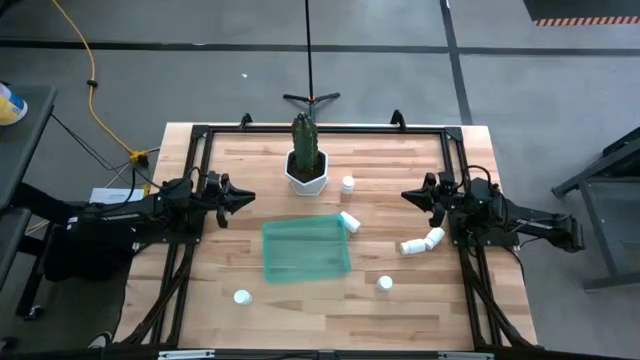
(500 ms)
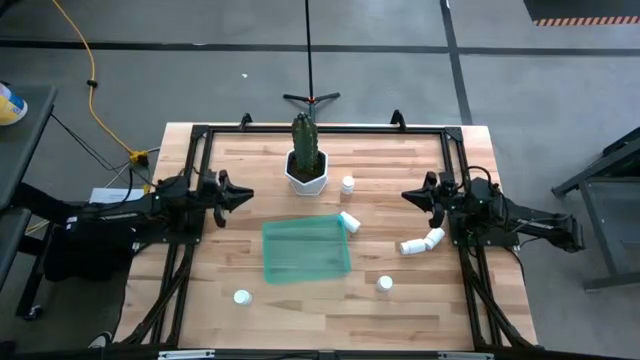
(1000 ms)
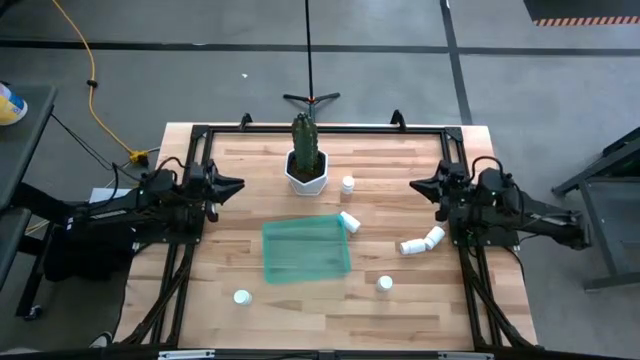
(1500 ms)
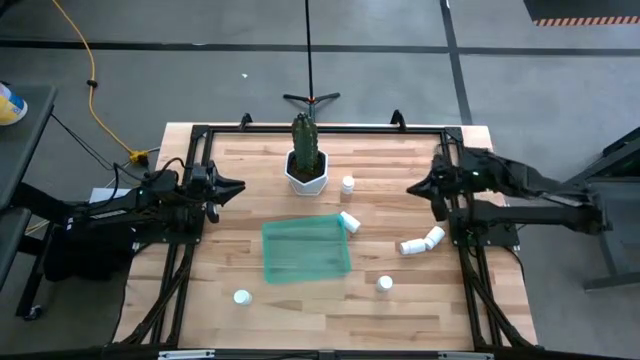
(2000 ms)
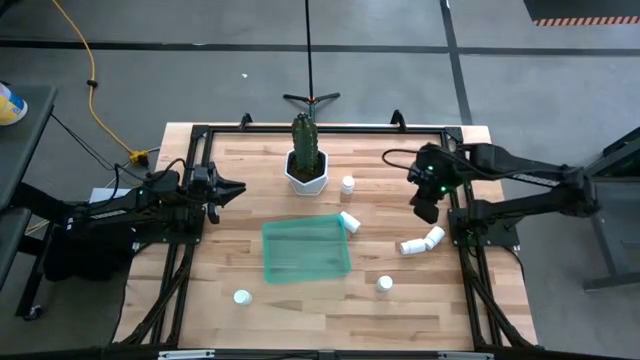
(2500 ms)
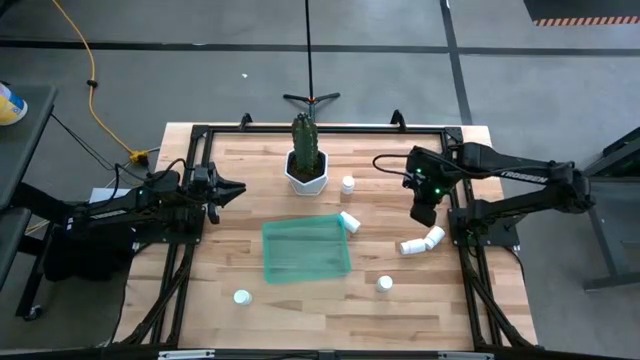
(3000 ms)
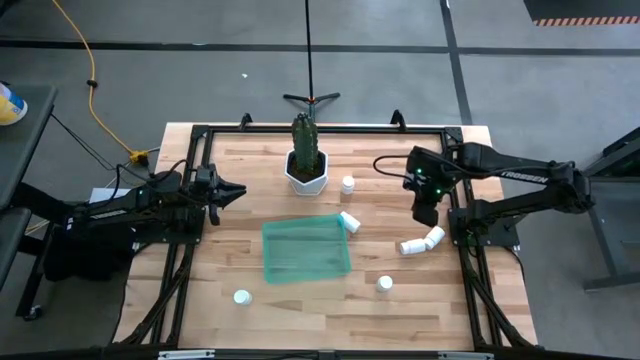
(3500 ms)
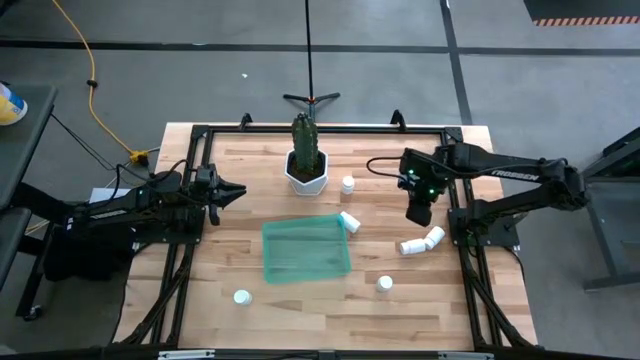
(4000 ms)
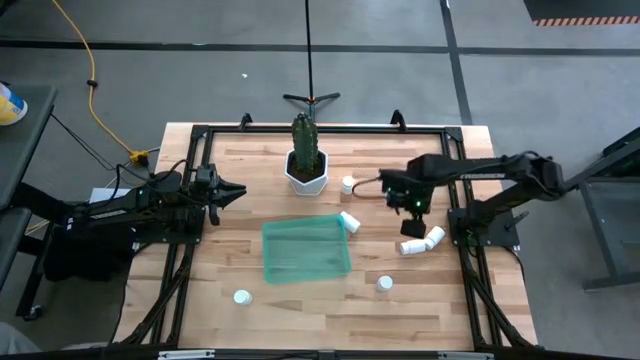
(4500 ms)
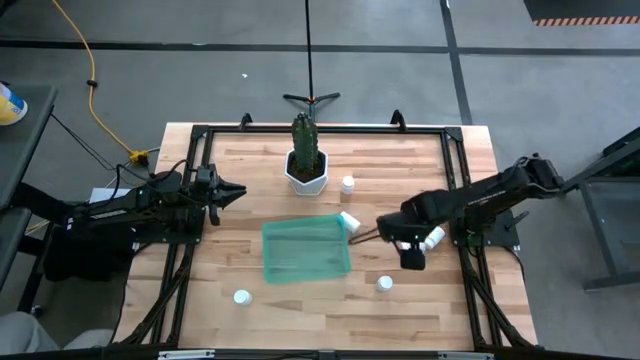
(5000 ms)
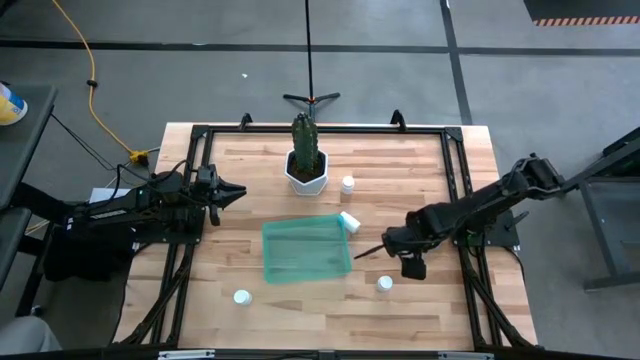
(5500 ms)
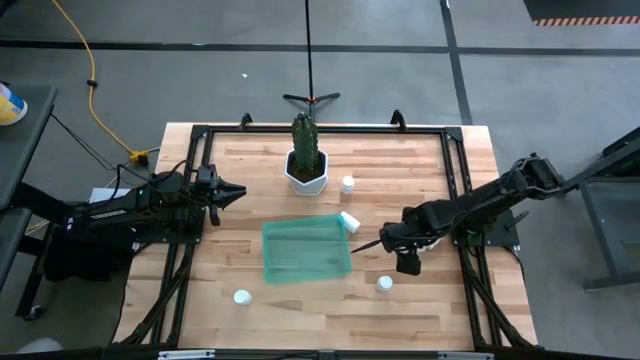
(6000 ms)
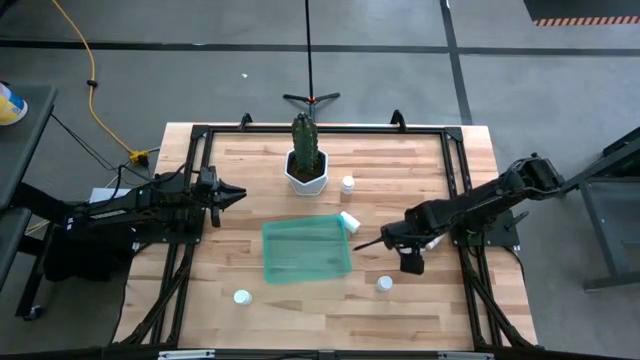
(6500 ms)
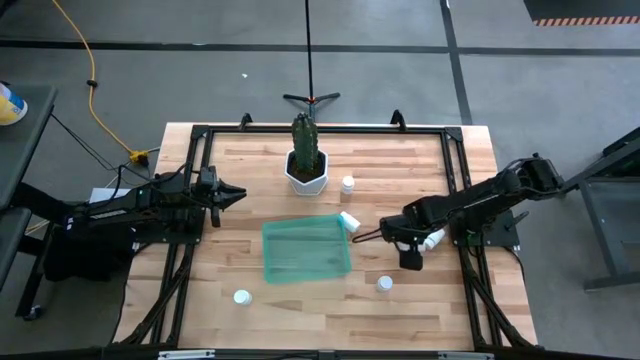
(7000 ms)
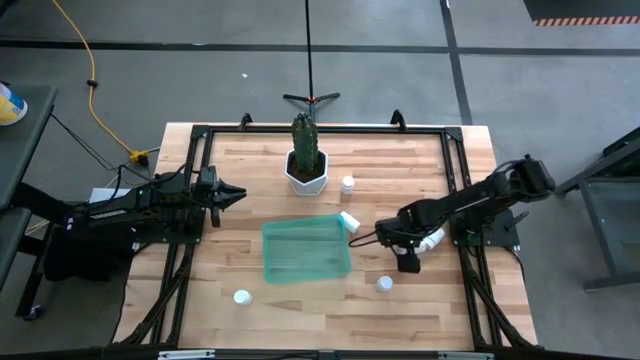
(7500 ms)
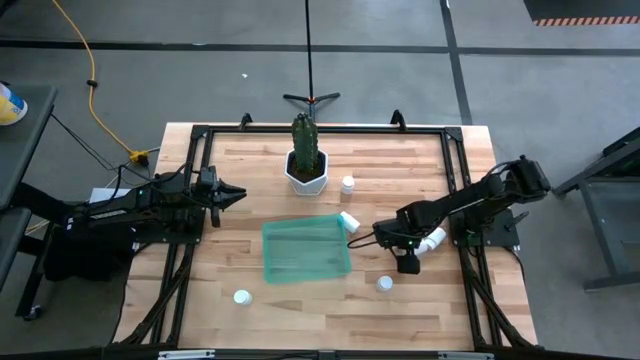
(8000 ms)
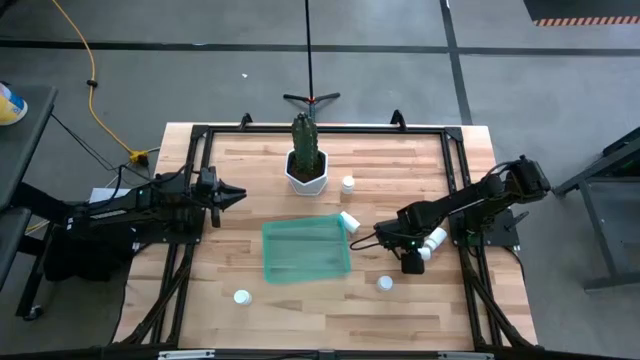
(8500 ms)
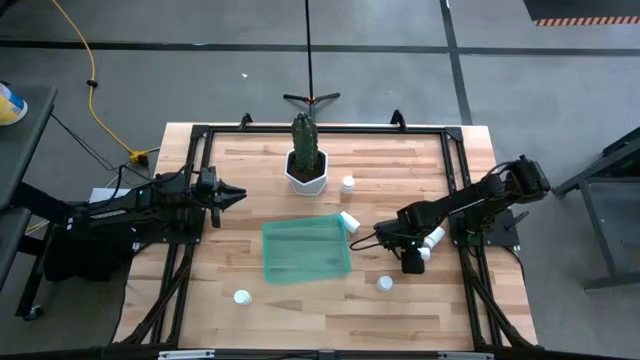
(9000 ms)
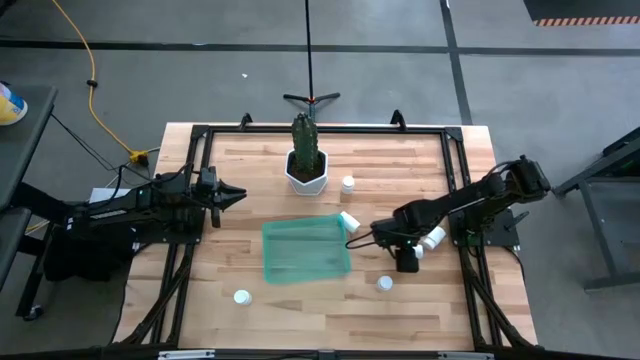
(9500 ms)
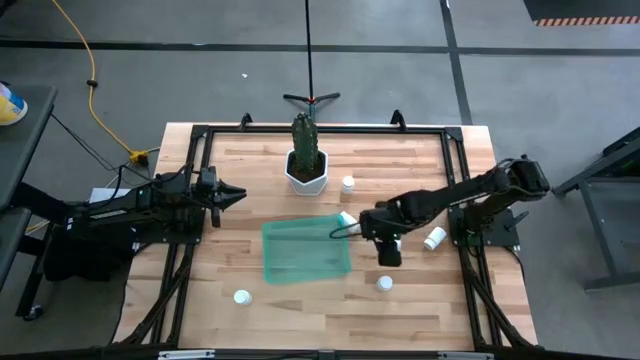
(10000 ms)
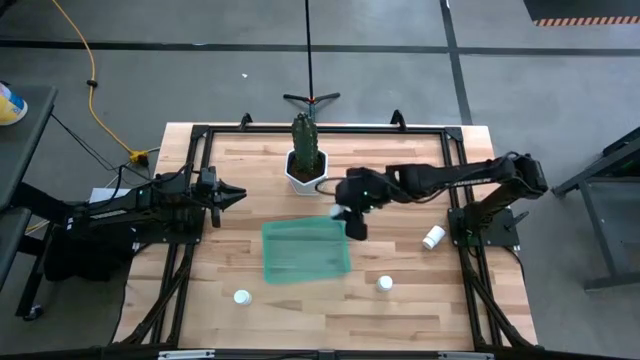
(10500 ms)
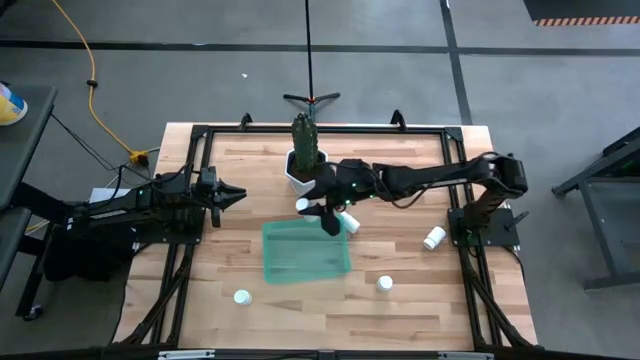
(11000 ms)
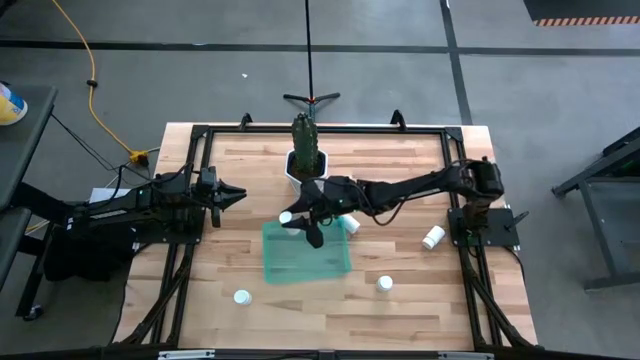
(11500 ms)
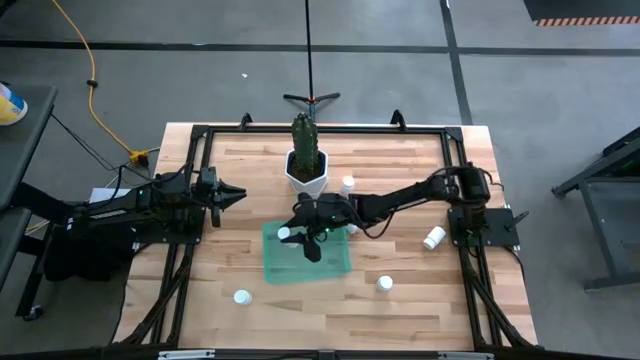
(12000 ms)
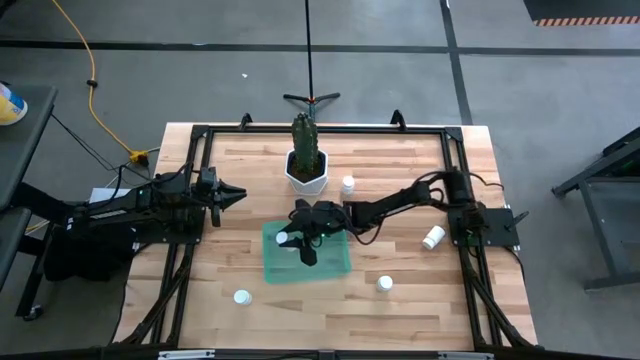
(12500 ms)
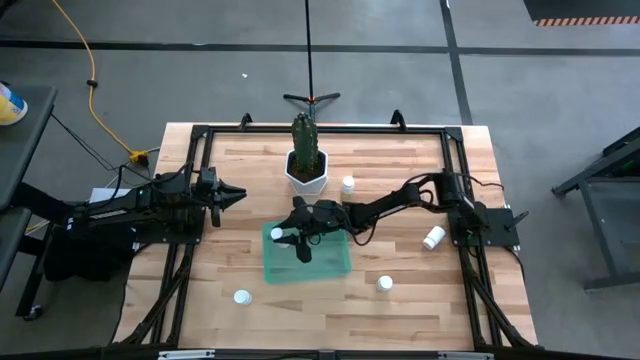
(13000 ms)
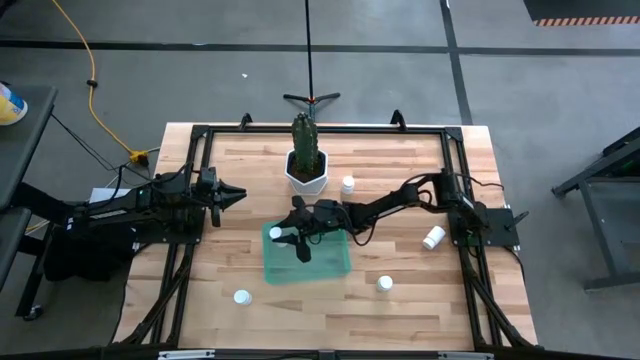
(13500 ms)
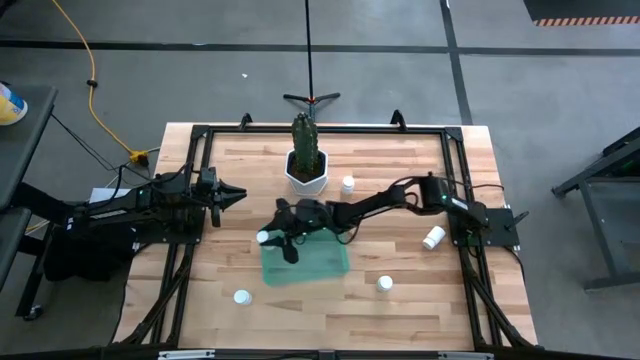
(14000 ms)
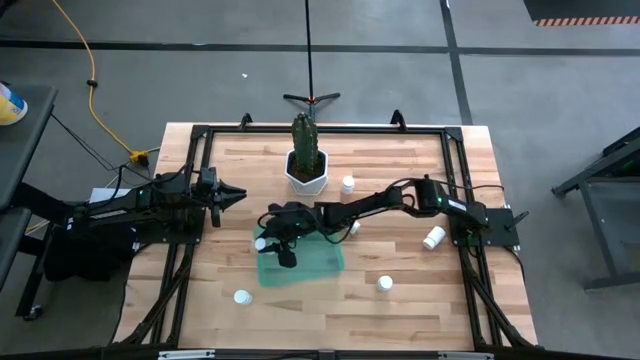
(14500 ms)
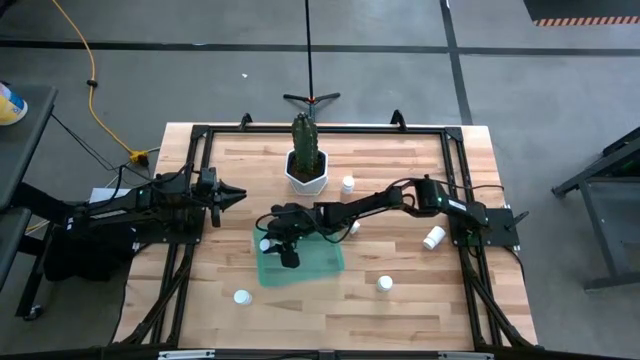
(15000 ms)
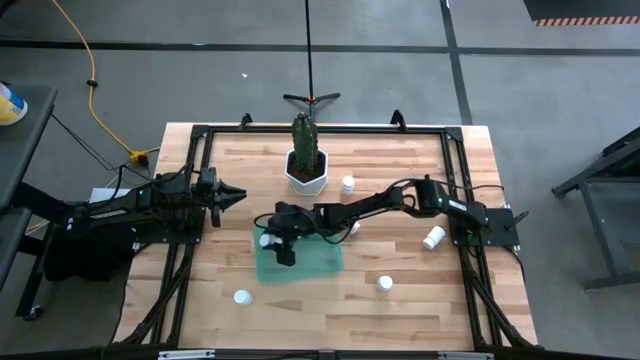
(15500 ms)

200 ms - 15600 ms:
Task: Pick and place pill bottles into a basket
Put the white pill bottle into the green bin
